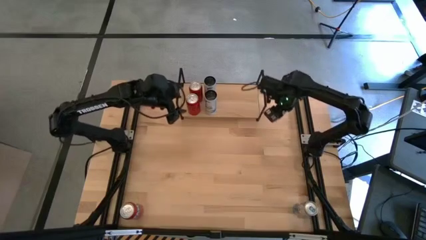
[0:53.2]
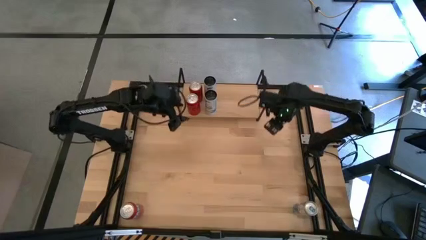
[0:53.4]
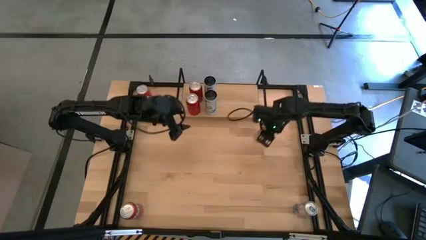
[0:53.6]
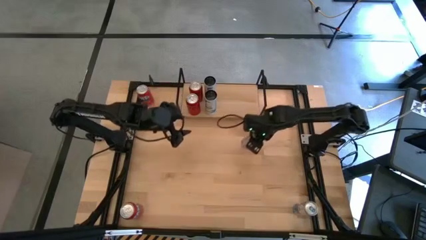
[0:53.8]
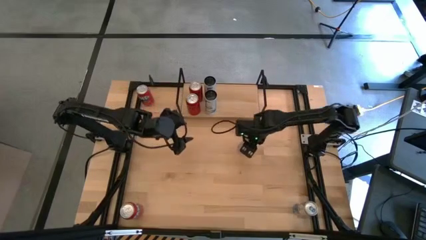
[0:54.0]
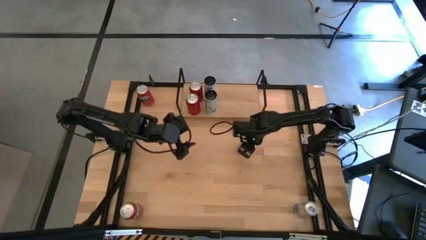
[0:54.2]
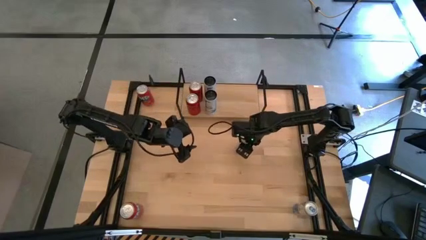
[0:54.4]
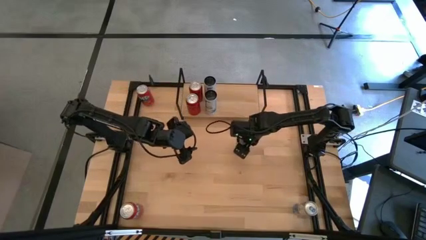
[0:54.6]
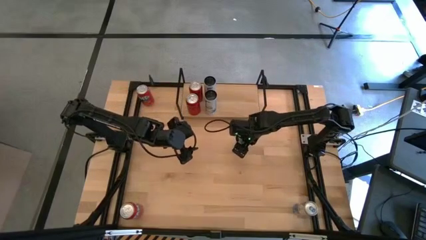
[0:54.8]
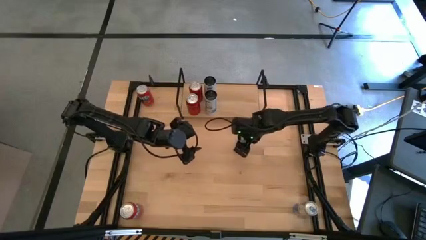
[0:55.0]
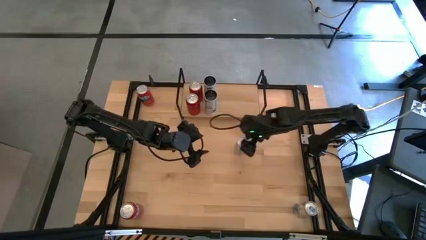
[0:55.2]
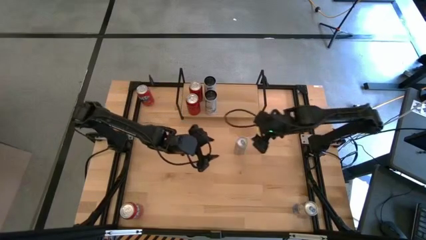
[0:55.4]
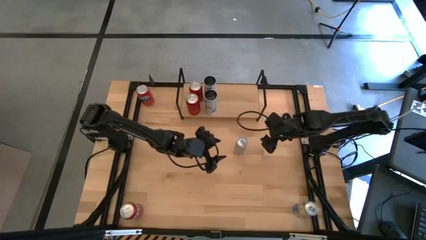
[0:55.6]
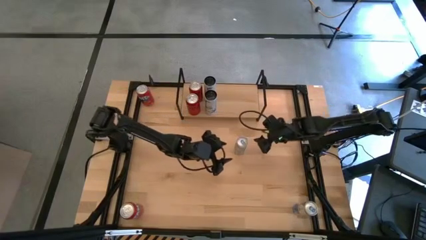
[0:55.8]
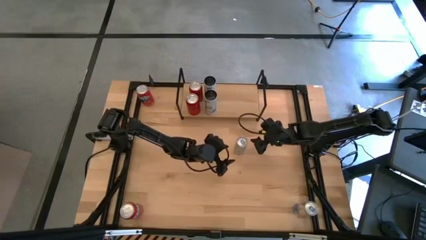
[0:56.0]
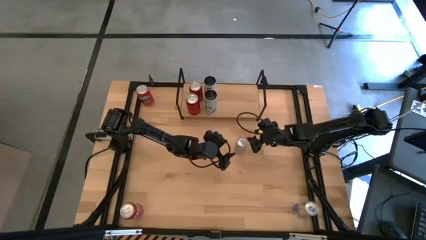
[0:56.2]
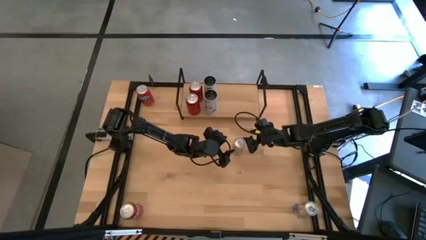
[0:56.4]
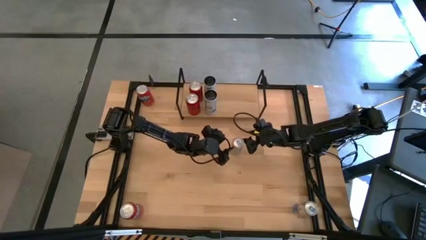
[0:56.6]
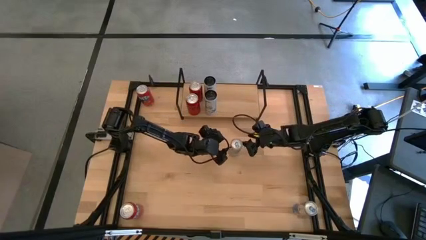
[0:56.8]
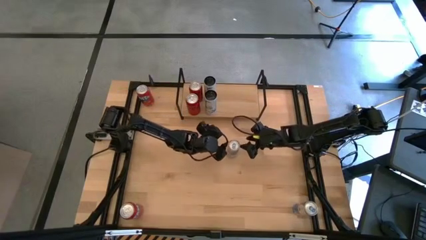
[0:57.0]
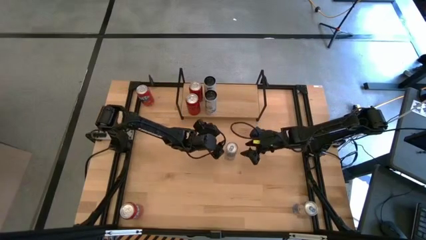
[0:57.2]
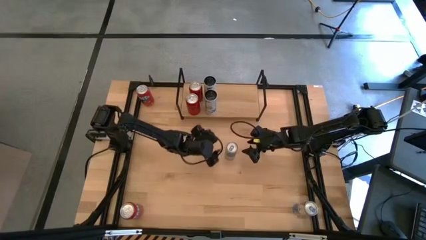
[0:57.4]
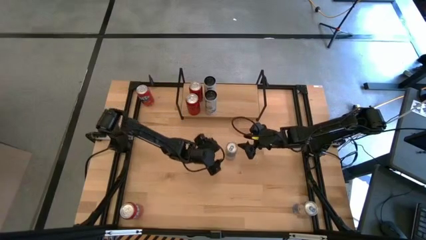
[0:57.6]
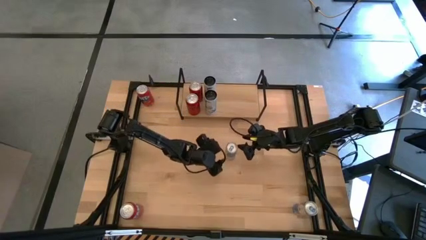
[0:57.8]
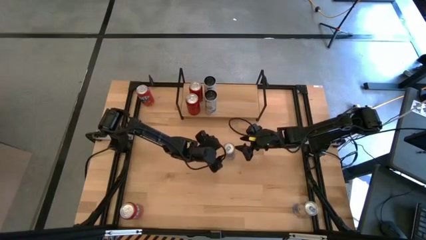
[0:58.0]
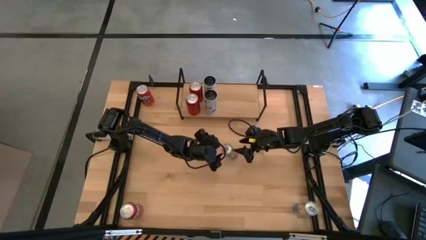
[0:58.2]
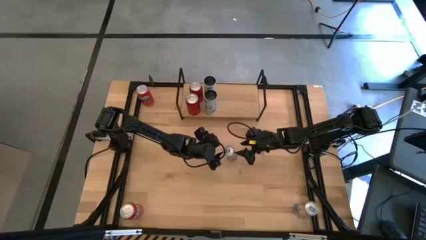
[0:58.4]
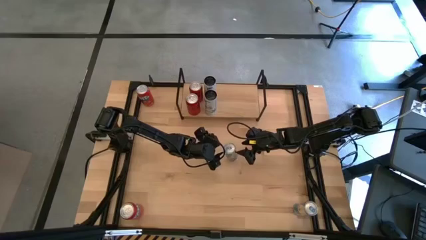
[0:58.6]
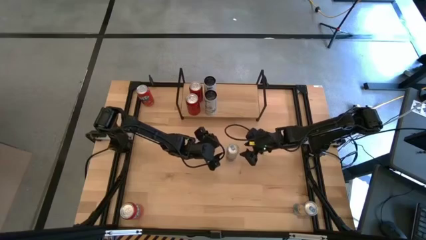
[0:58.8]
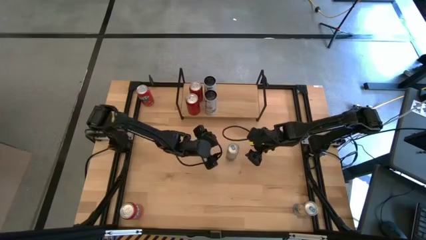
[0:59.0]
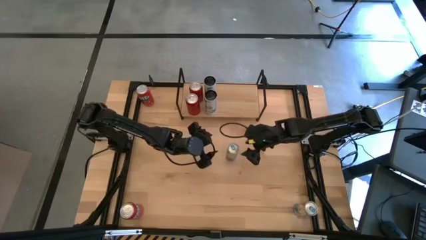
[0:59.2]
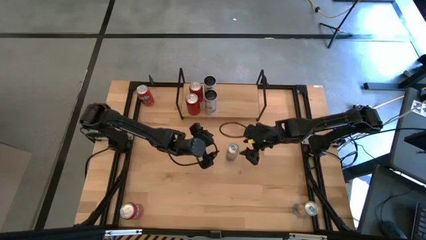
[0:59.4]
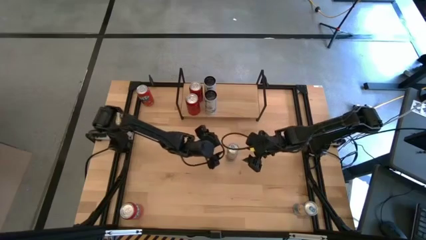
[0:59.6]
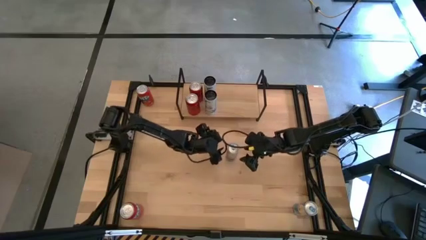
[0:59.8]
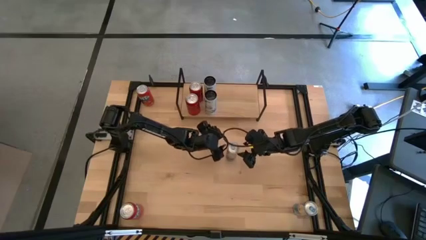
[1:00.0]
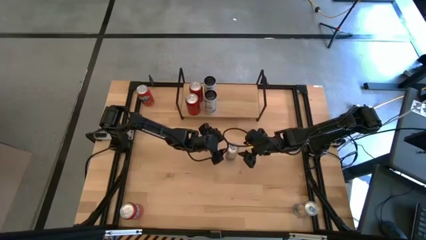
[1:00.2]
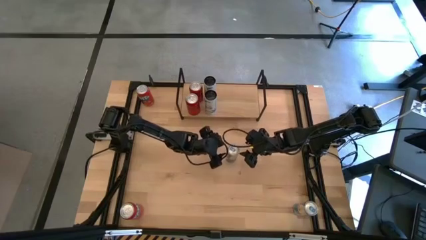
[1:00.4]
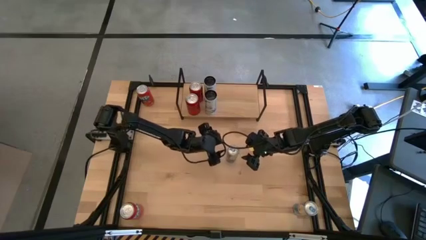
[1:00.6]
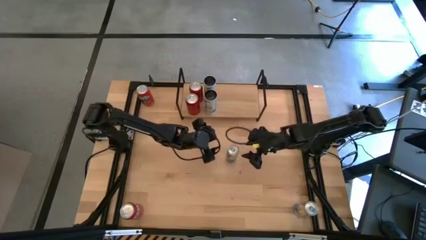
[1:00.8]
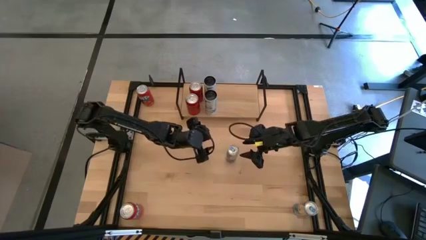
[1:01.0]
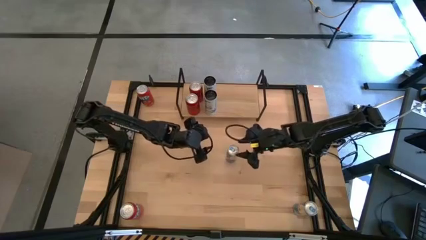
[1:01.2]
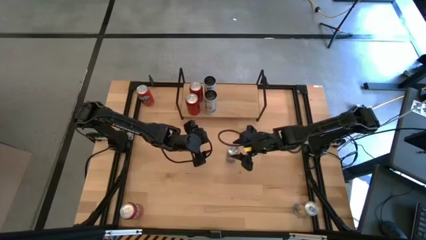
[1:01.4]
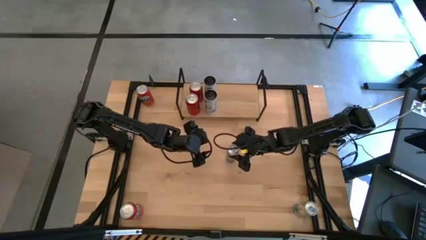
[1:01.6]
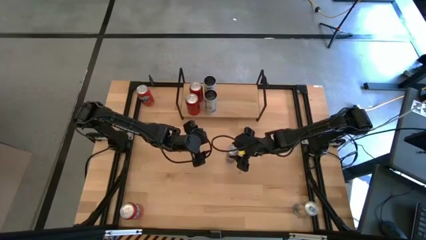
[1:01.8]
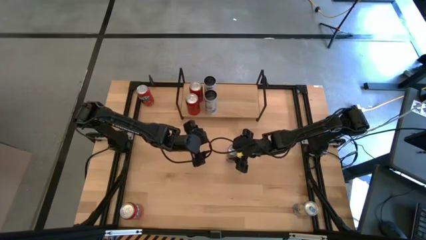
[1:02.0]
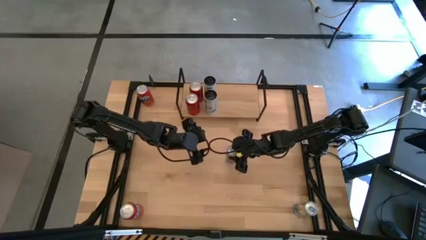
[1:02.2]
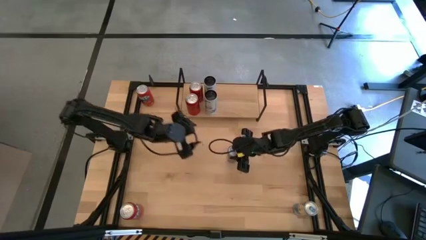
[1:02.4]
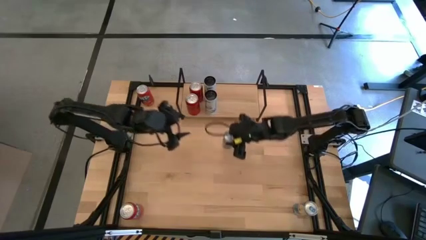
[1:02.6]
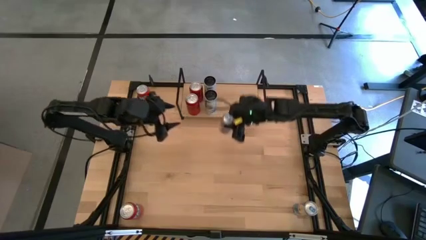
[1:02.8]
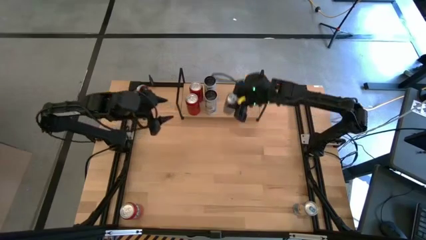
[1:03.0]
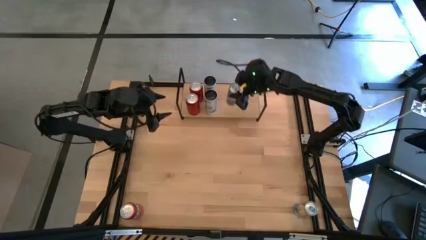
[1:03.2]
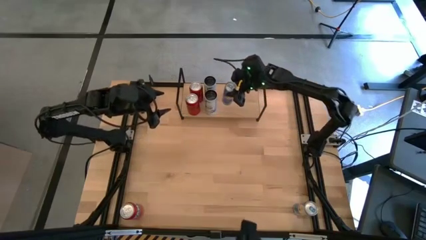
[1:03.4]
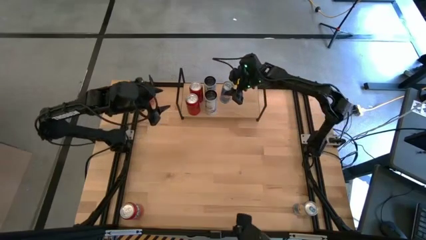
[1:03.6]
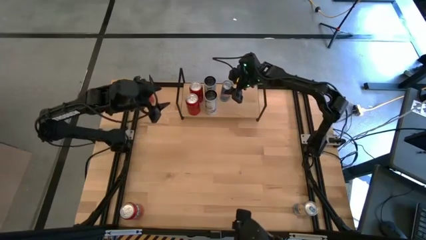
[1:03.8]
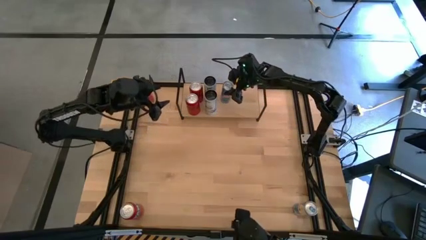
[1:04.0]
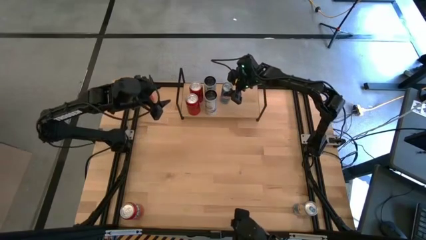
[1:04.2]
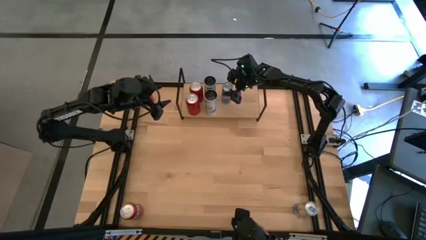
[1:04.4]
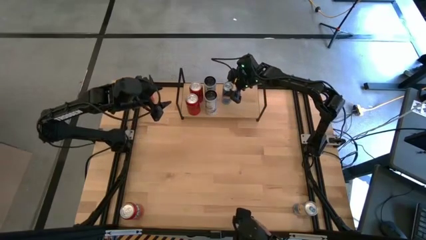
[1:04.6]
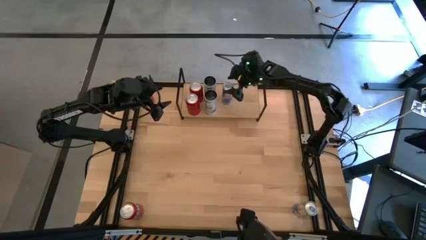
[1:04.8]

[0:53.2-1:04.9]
Task: Place canned beverage on shelf
Put the top blue soda can on the shelf

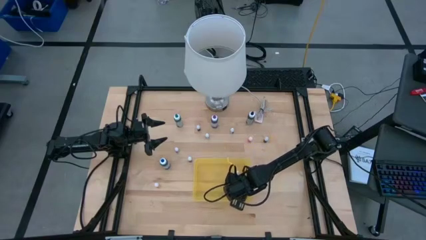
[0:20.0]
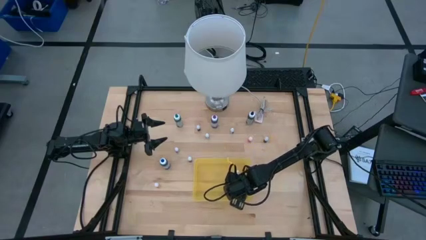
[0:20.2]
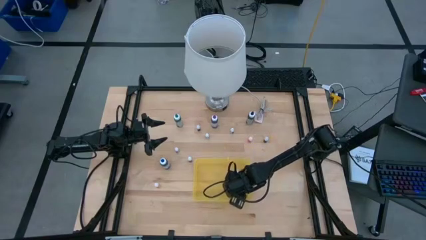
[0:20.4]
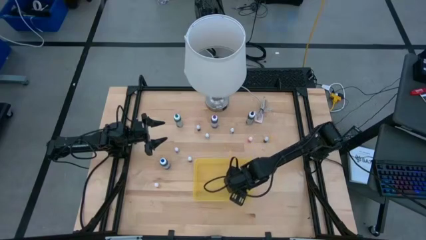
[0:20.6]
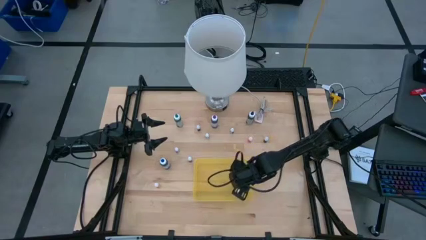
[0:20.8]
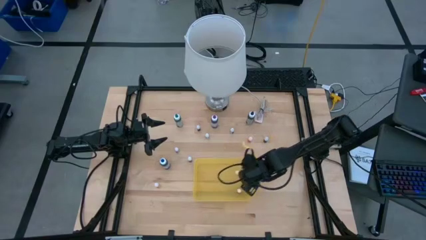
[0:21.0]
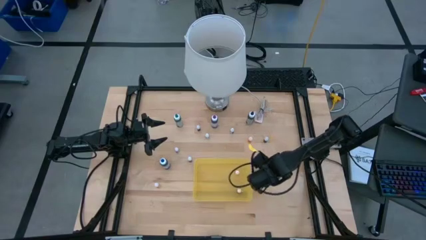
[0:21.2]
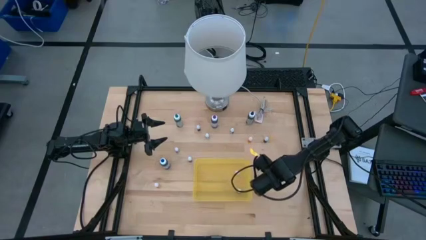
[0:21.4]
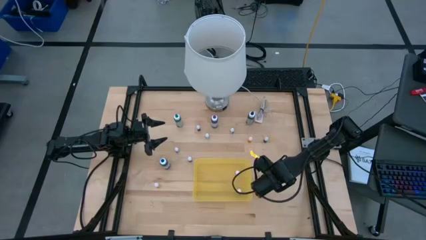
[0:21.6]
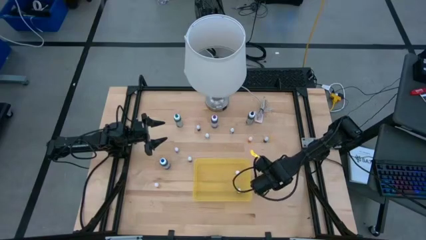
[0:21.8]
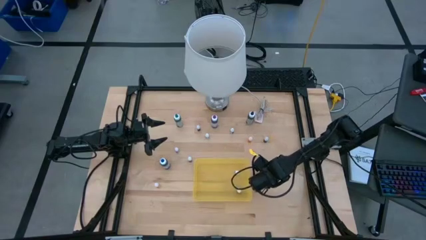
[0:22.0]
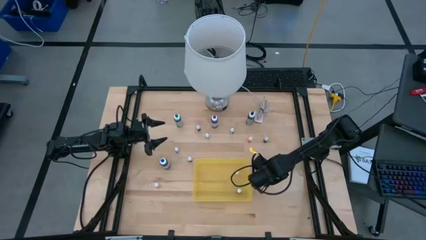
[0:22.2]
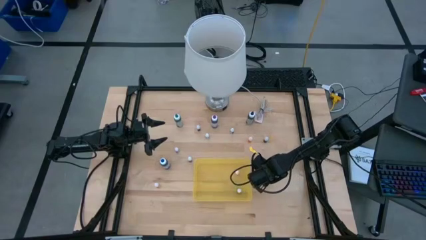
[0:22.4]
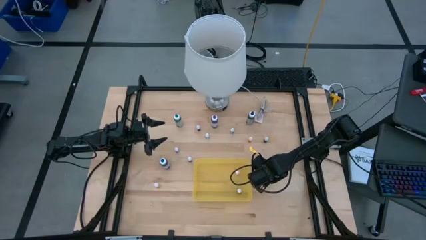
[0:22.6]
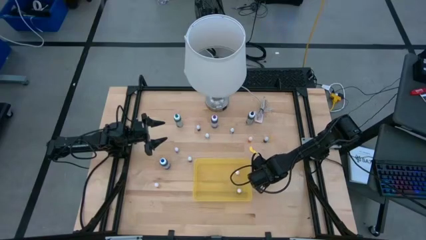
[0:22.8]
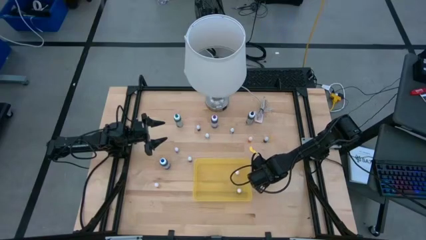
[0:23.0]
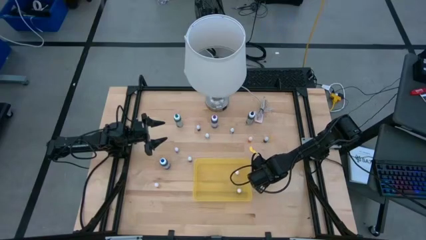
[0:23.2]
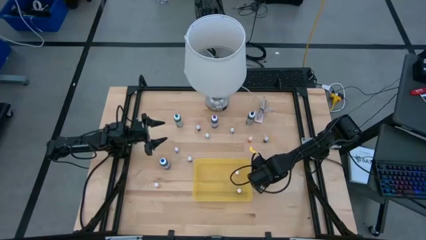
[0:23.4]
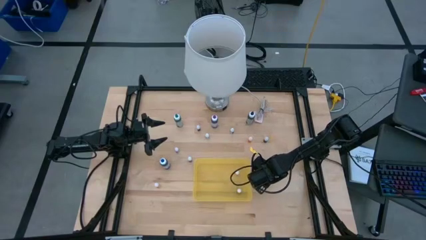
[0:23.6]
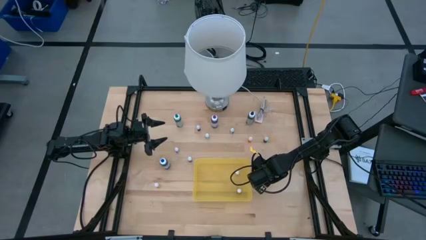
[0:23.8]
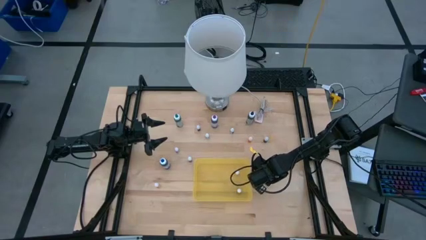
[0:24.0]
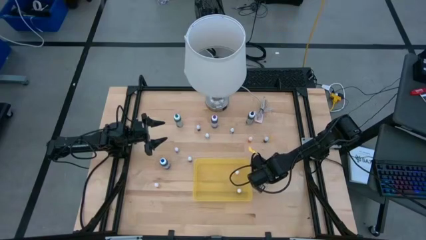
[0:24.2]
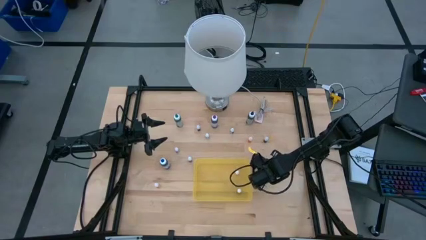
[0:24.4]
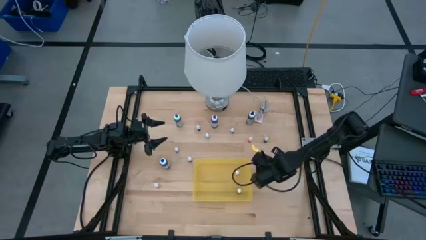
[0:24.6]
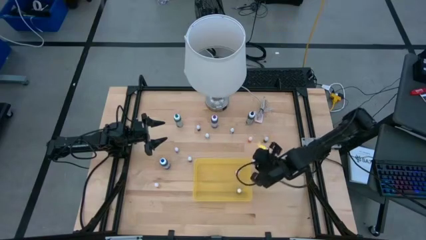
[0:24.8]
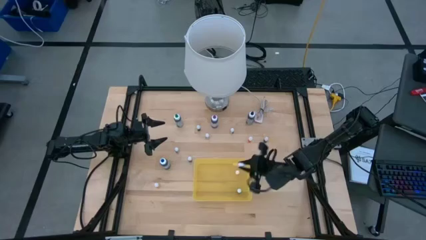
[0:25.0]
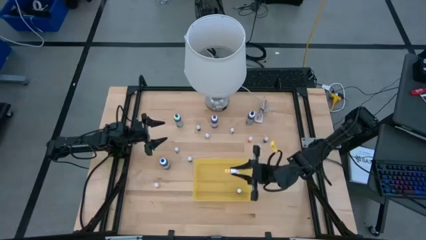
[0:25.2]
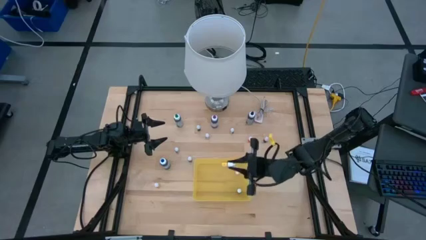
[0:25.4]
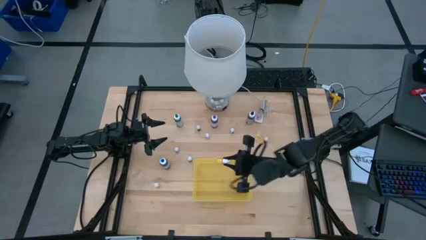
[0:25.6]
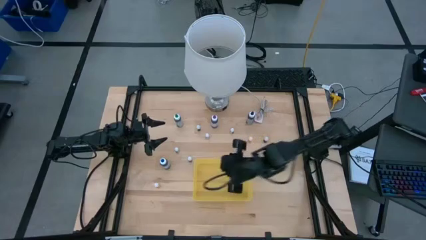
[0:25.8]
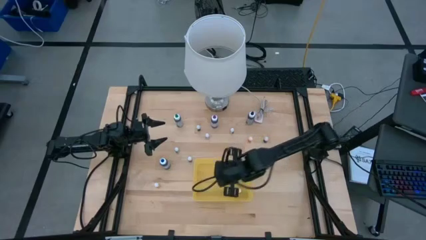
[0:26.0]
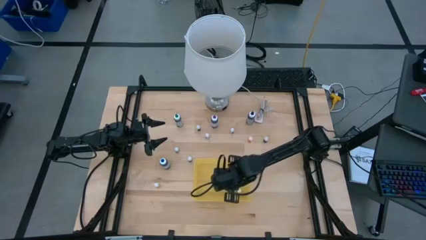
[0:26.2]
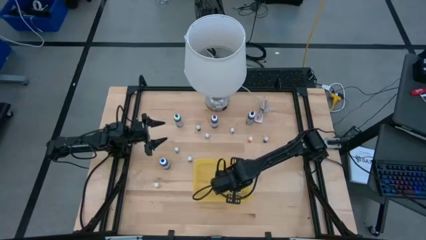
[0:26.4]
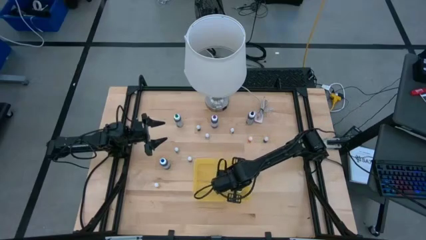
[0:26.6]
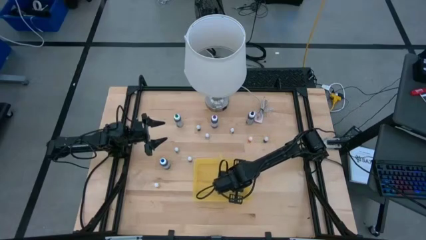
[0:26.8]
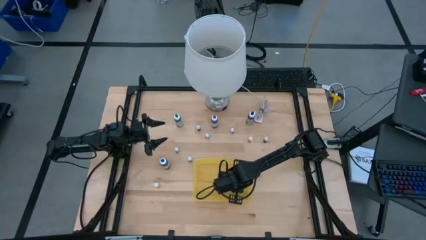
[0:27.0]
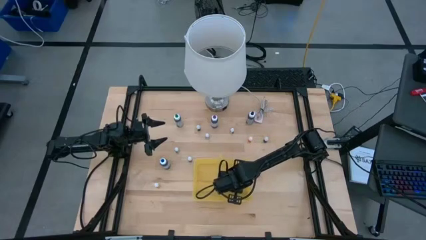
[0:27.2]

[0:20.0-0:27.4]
Task: Pick & Place food coloring
Put the bottom right small orange food coloring bottle into the transparent bin
